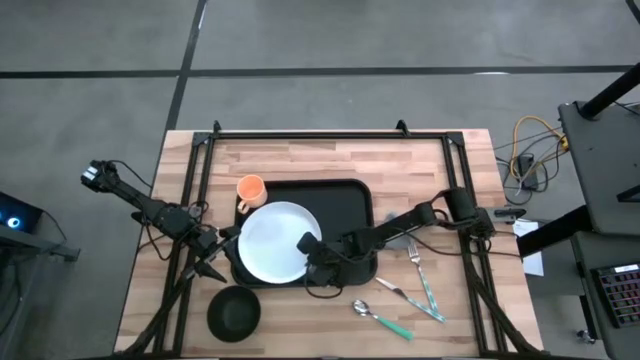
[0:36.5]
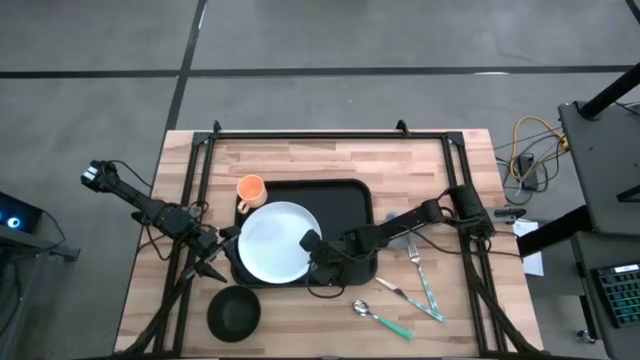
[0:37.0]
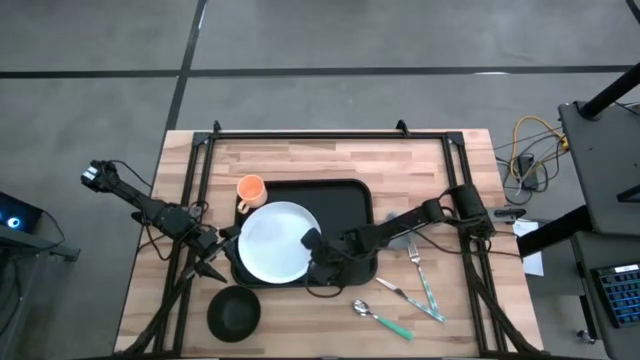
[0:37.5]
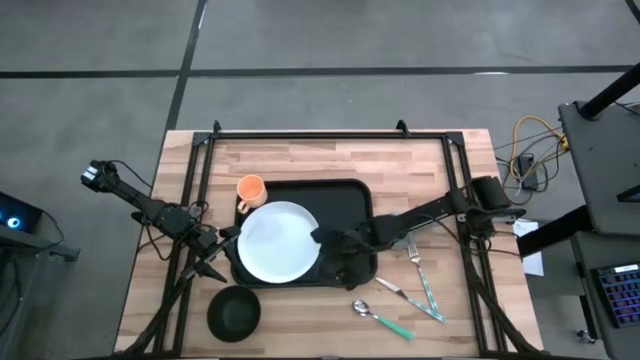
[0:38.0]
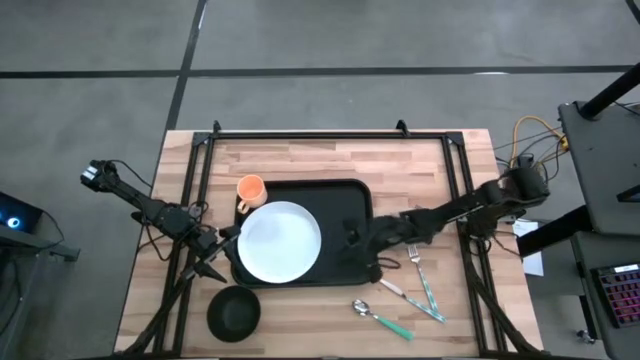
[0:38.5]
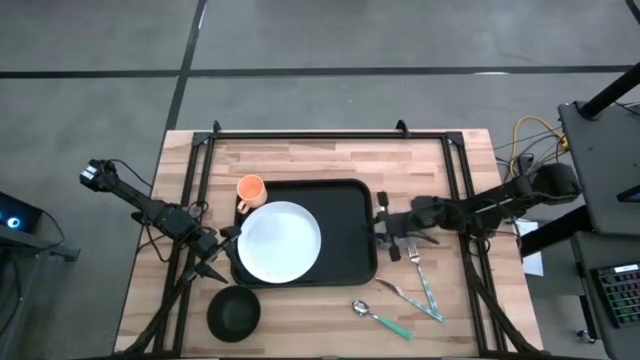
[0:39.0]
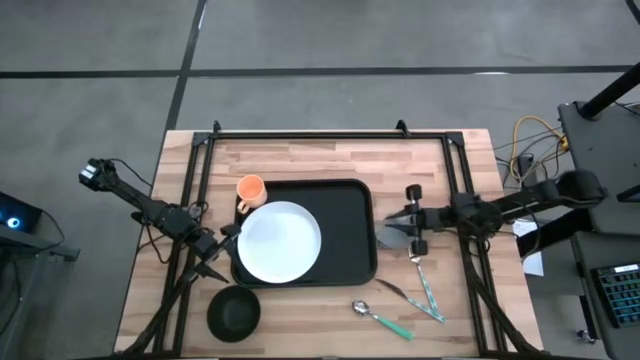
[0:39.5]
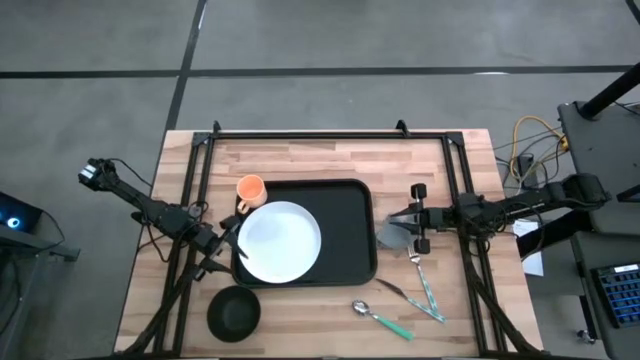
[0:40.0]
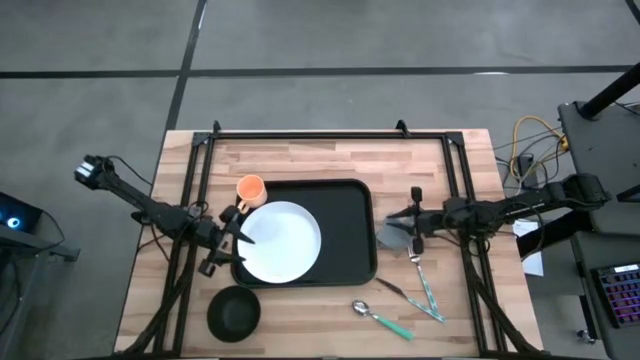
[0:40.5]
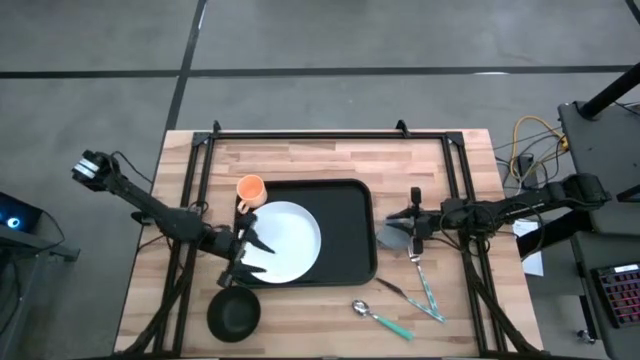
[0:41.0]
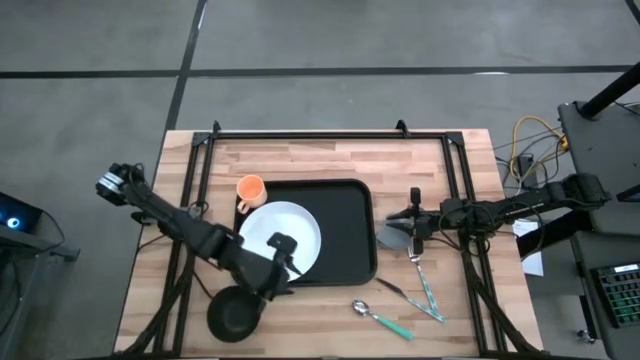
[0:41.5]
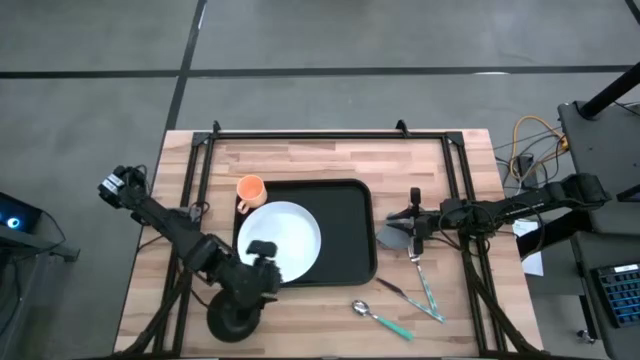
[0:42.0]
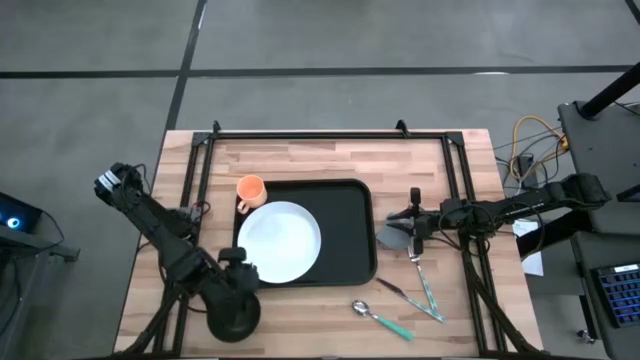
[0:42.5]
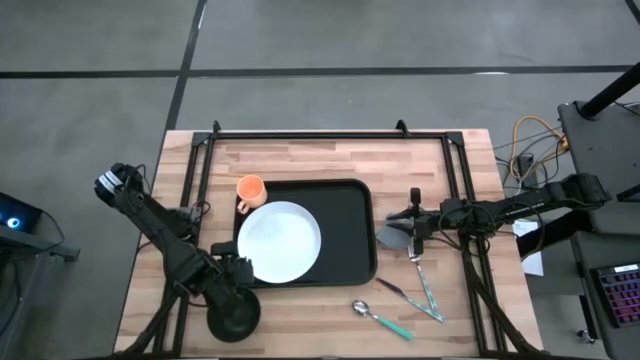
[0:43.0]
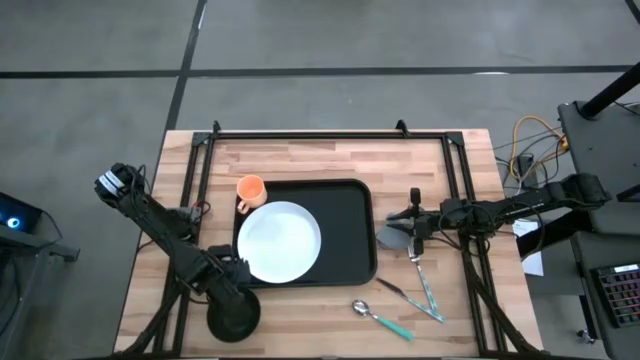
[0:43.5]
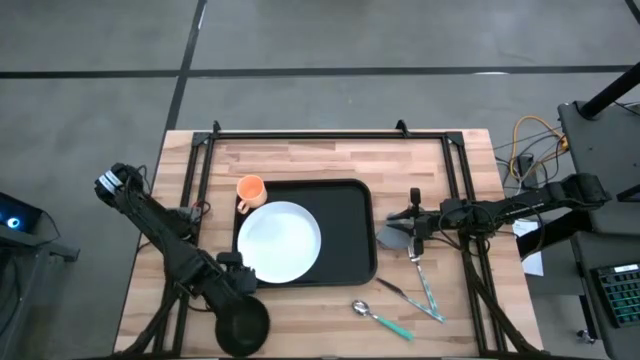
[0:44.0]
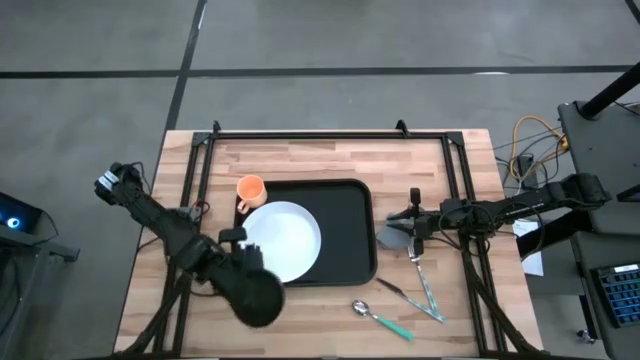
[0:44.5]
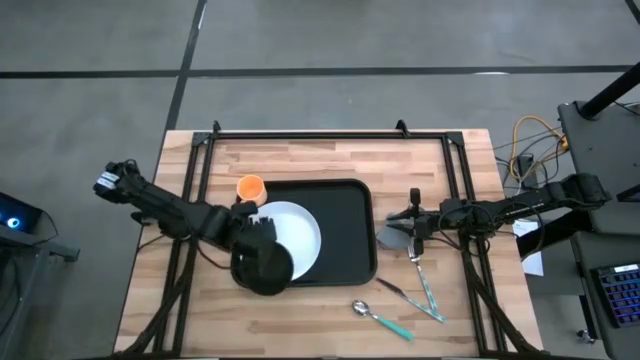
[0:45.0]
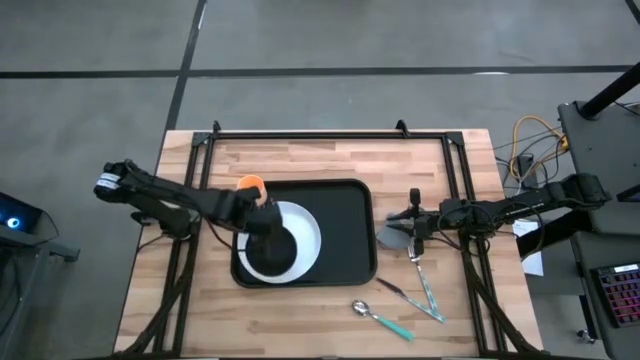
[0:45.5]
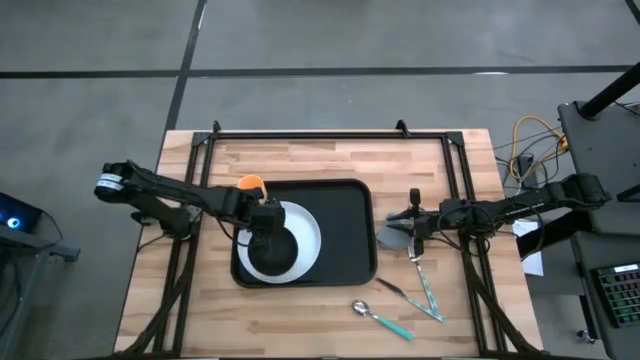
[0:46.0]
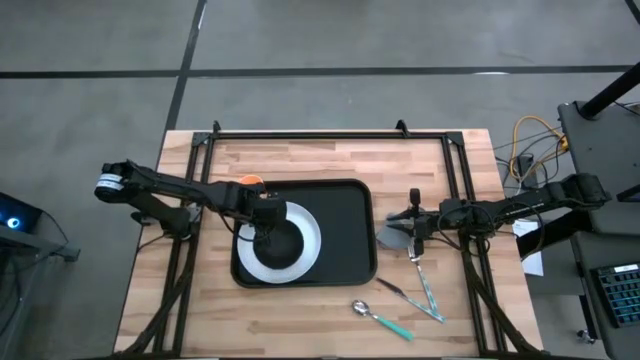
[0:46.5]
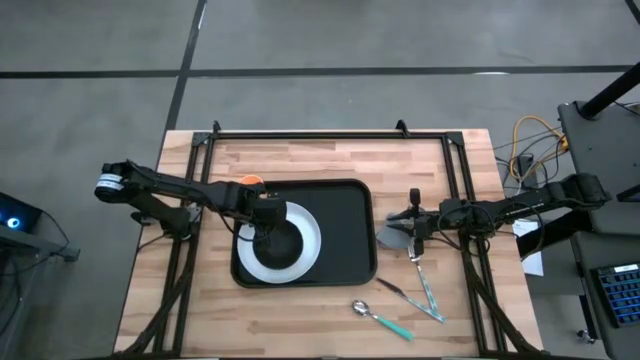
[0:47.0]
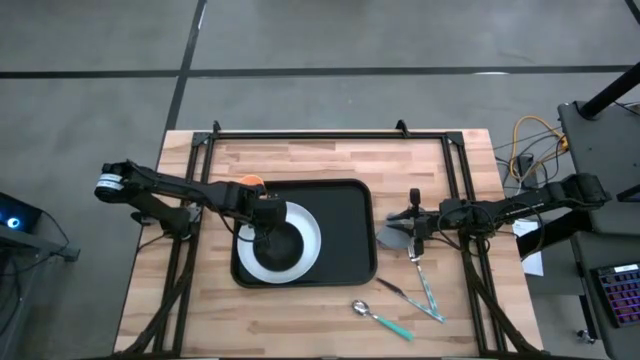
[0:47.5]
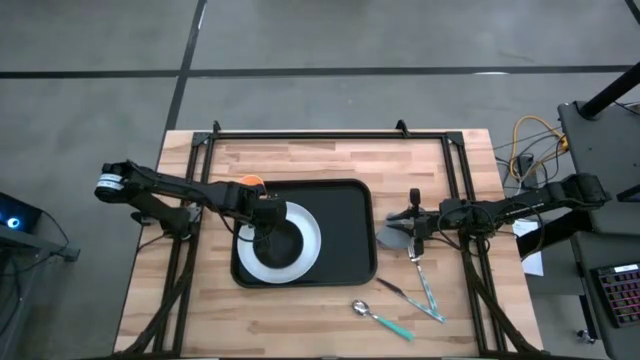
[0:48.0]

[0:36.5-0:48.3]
Task: Set up tray
Put the black bowl on the white plate

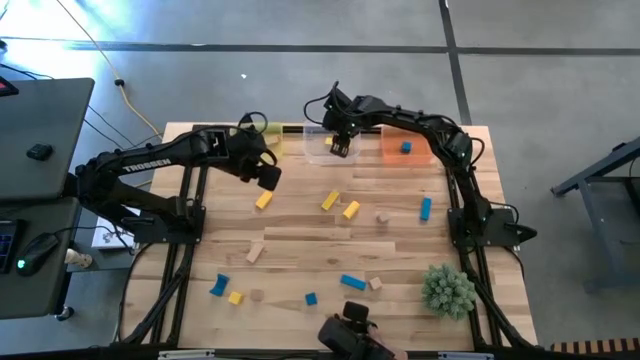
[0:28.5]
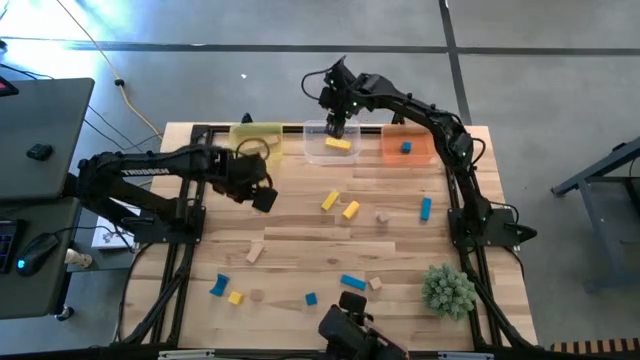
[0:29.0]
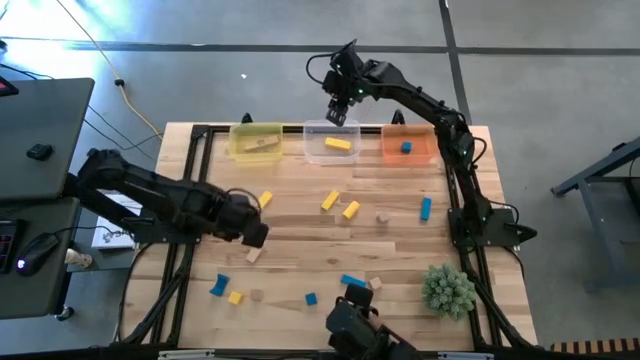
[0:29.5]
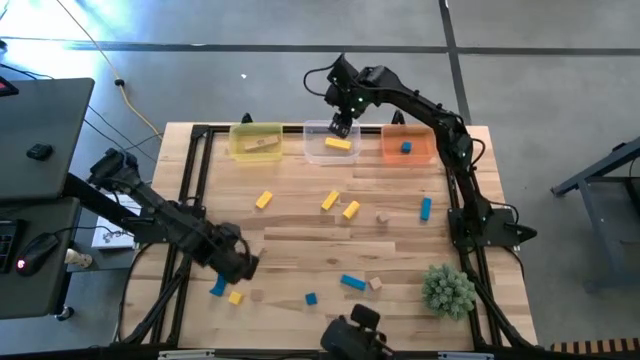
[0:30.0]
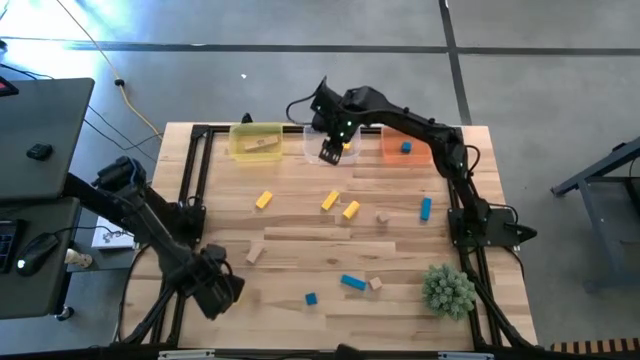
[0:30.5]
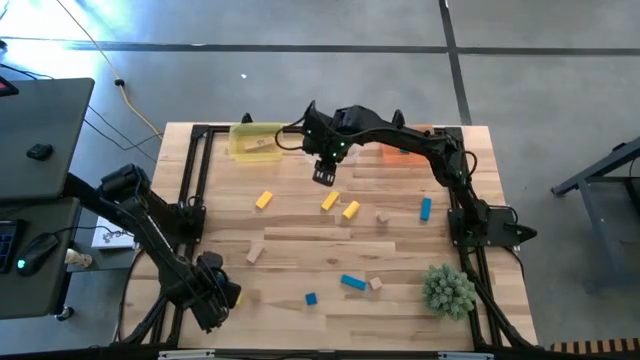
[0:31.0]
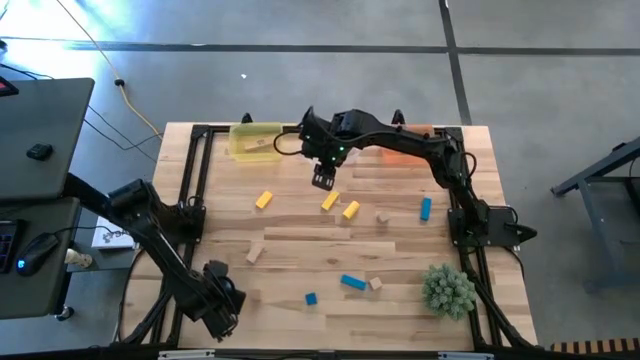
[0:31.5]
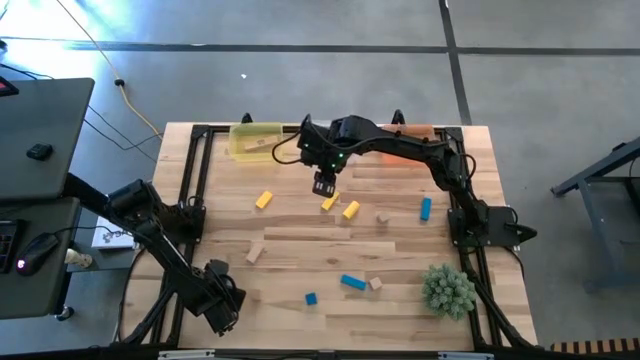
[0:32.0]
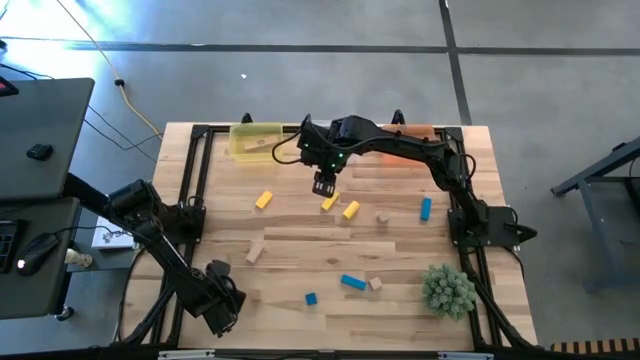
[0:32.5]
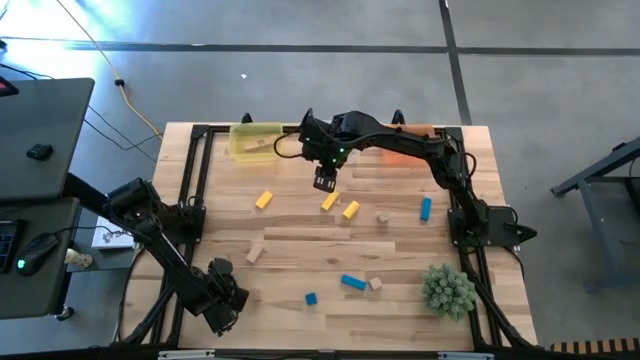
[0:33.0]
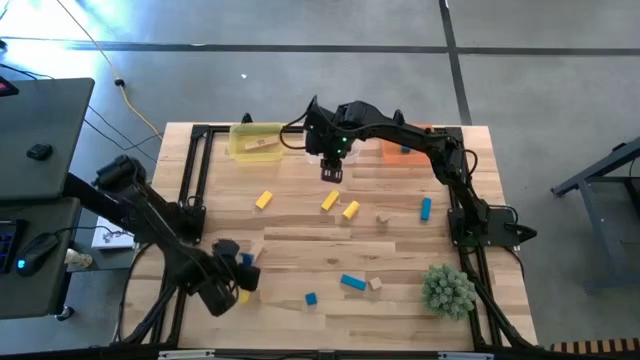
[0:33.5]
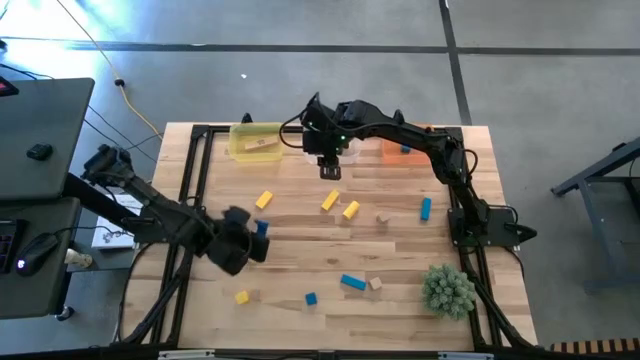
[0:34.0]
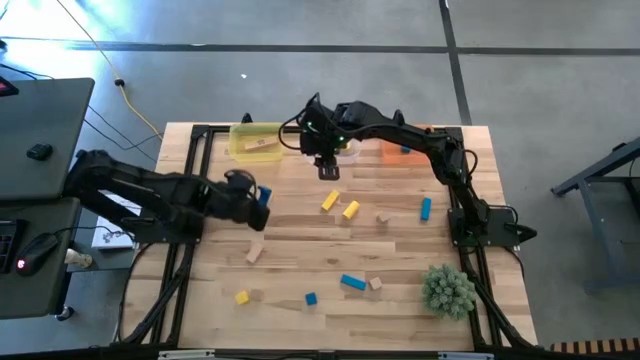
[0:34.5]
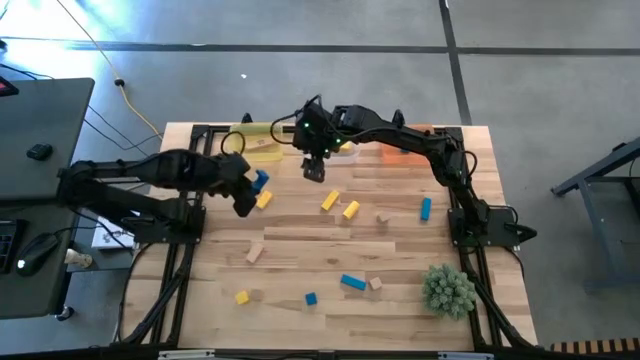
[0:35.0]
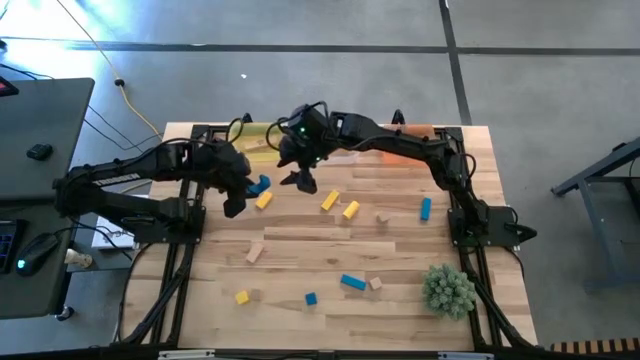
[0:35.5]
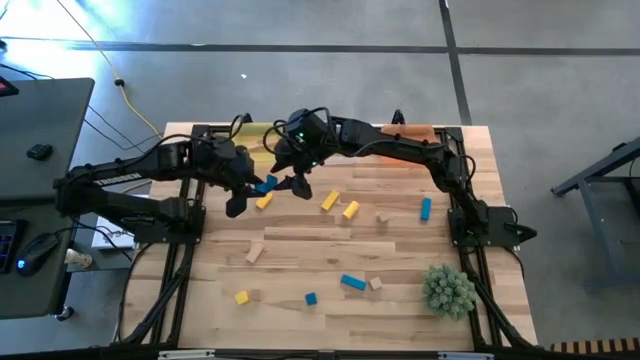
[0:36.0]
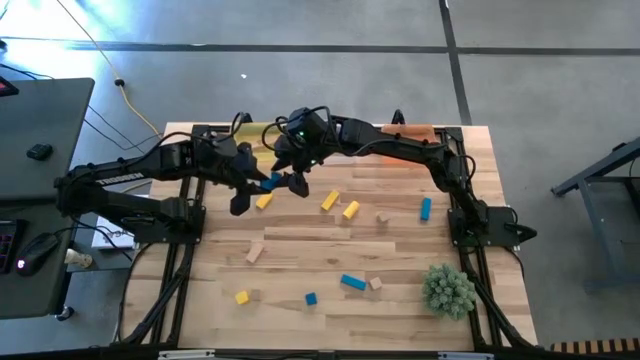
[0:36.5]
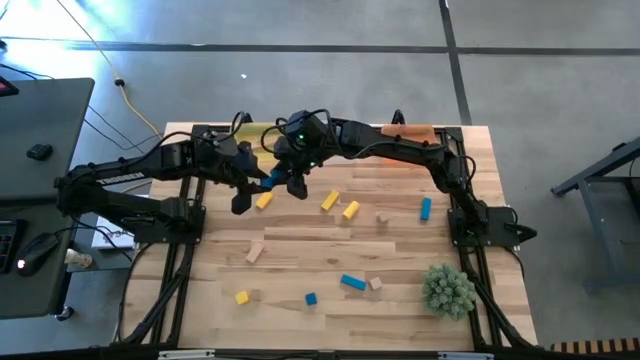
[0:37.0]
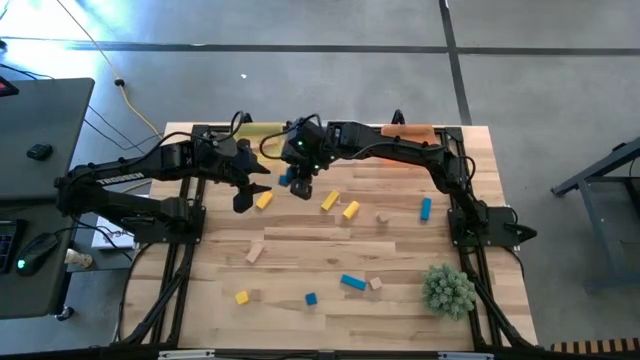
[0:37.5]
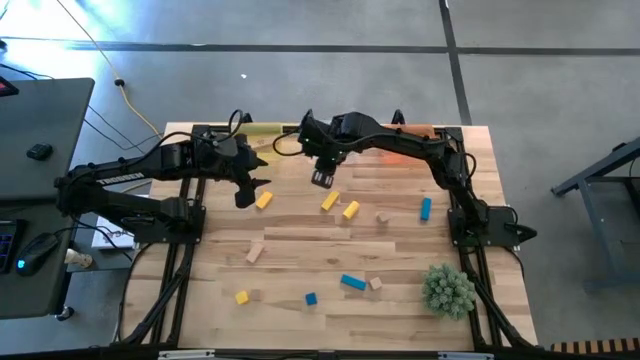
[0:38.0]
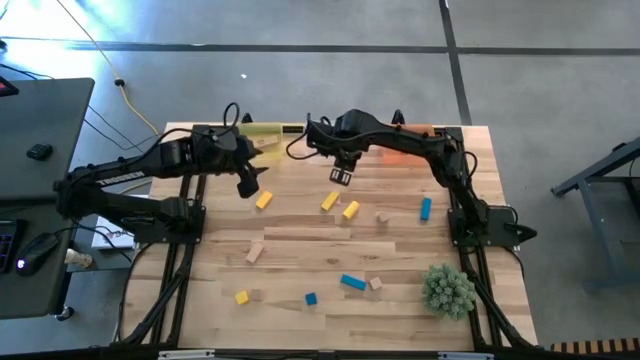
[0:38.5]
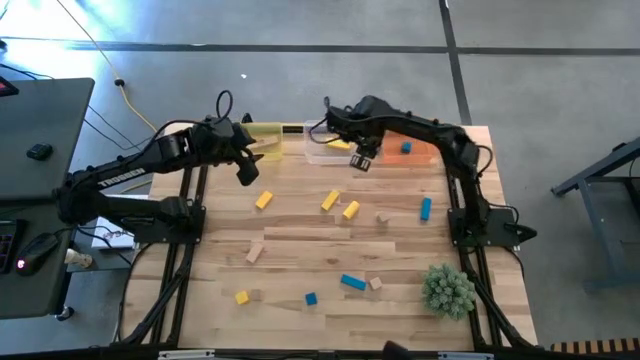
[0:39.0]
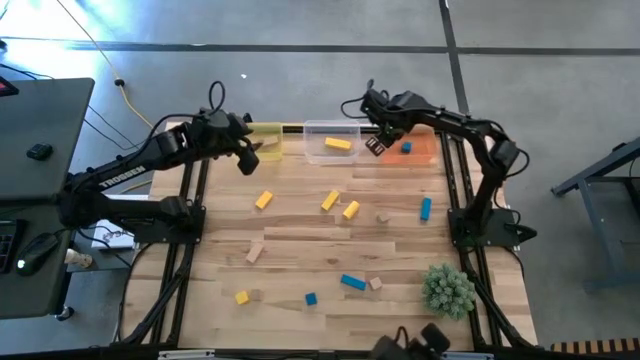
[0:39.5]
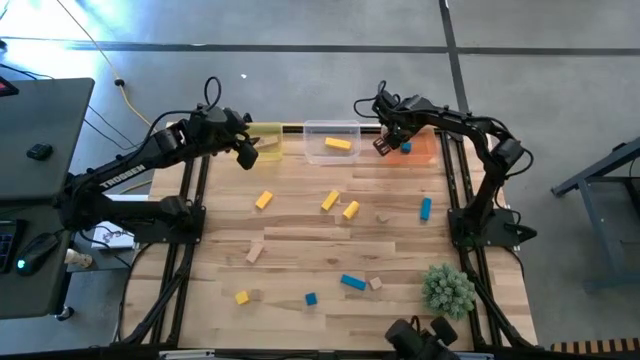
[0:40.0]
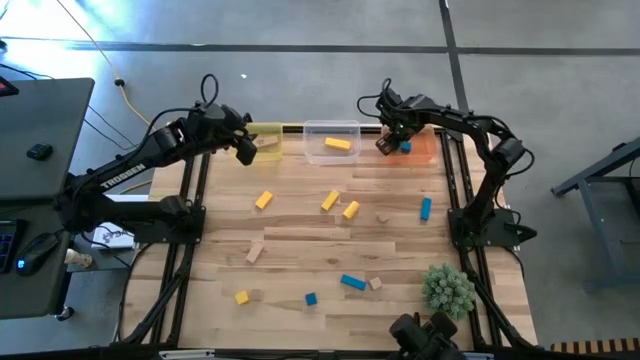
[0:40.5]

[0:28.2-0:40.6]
Task: Sort & place blocks by color
Put the blue block into the orange bin
